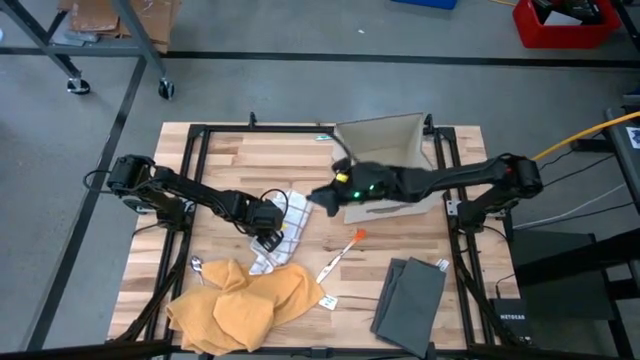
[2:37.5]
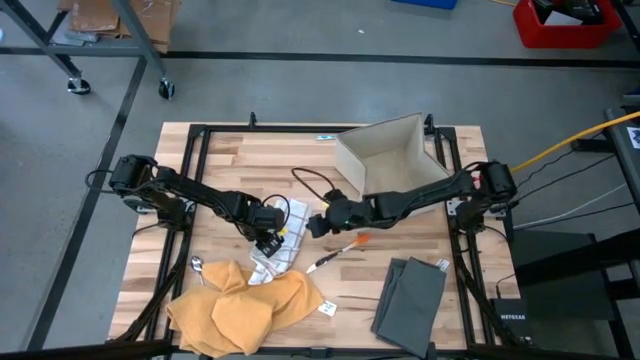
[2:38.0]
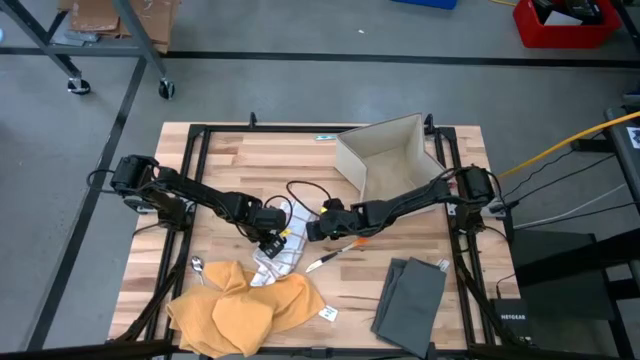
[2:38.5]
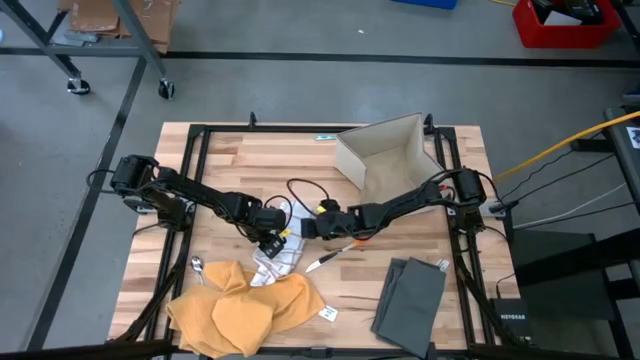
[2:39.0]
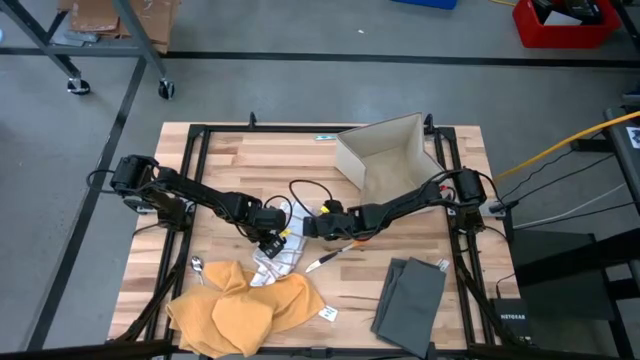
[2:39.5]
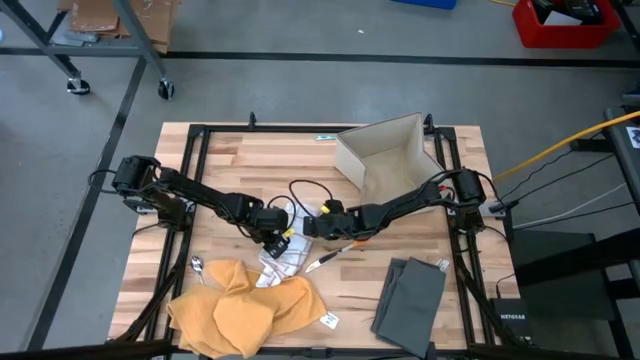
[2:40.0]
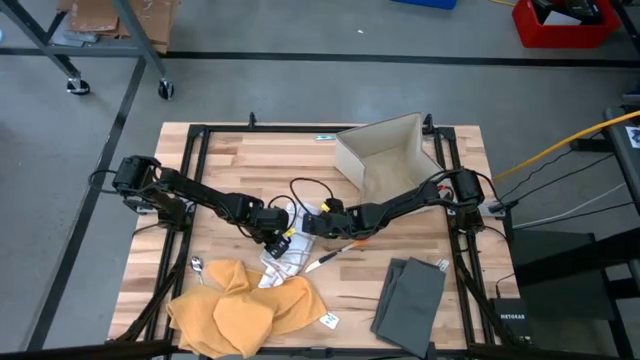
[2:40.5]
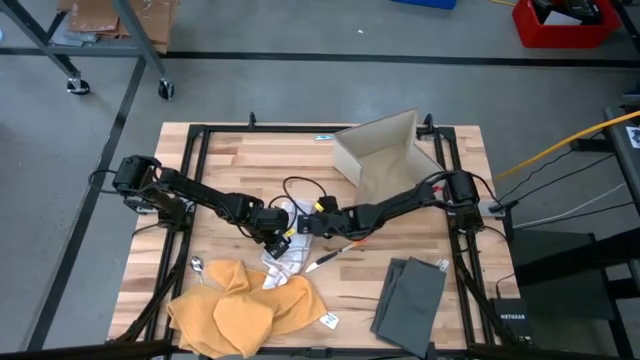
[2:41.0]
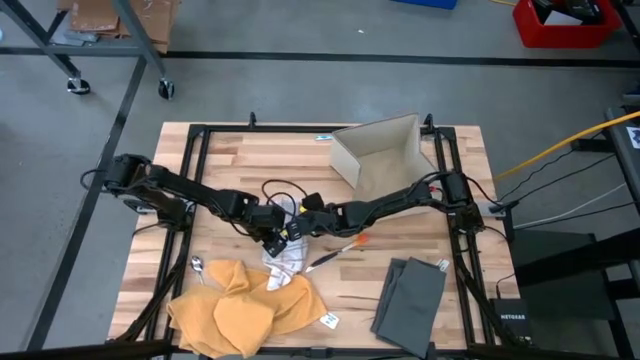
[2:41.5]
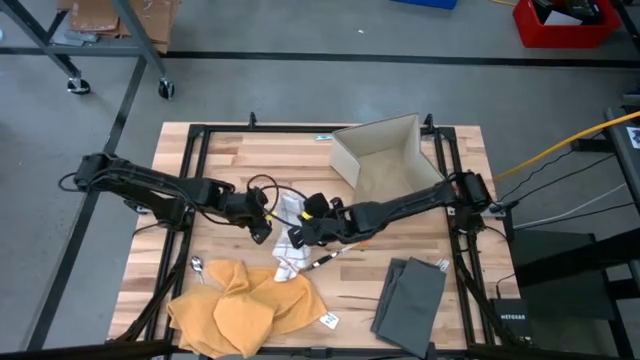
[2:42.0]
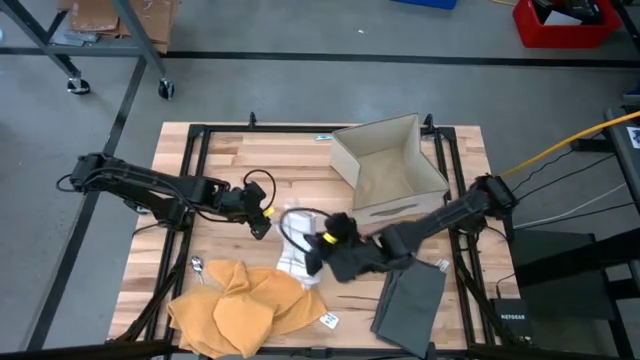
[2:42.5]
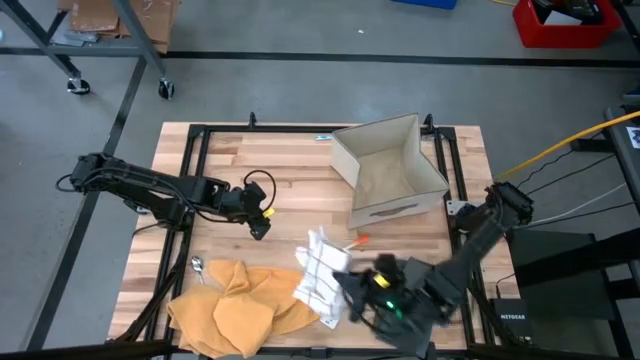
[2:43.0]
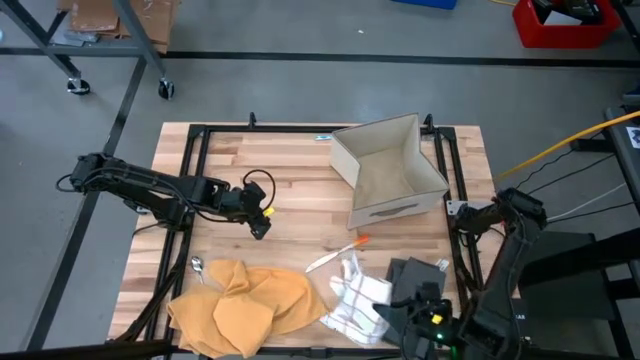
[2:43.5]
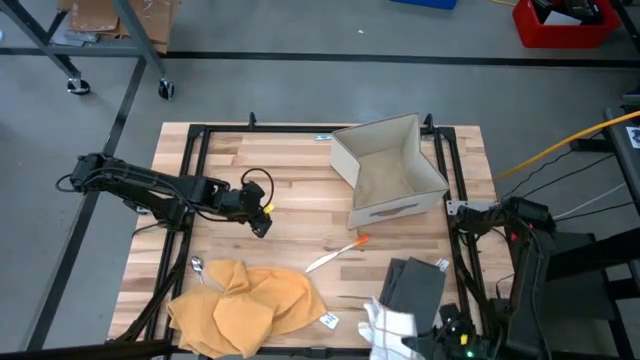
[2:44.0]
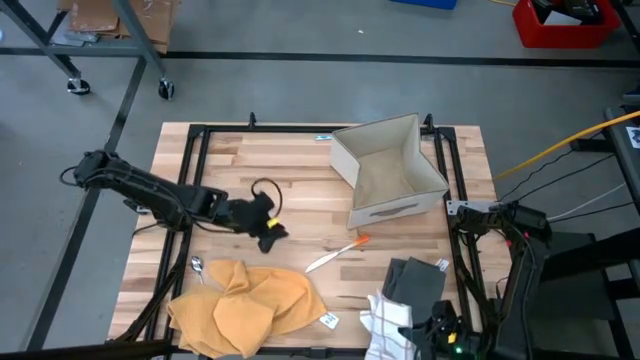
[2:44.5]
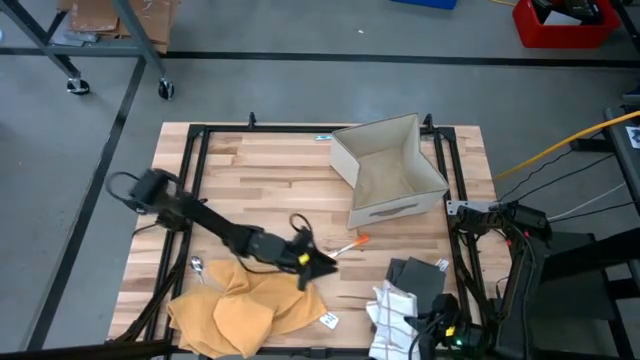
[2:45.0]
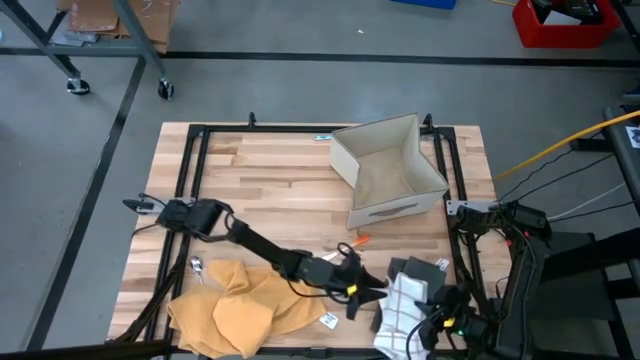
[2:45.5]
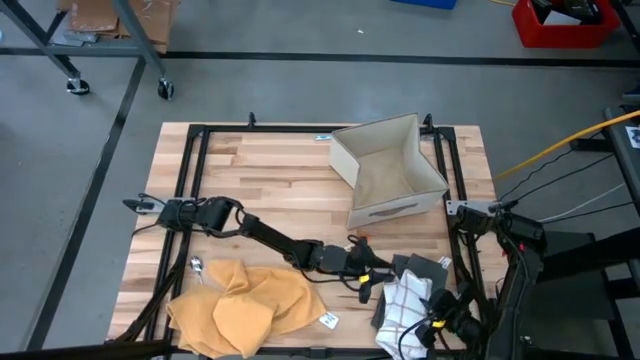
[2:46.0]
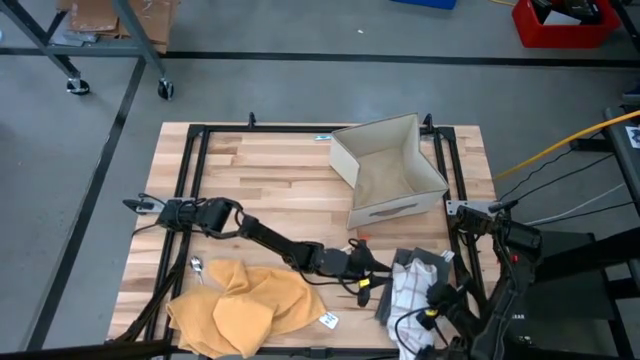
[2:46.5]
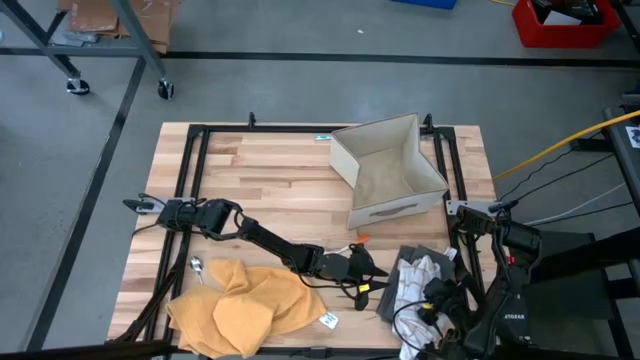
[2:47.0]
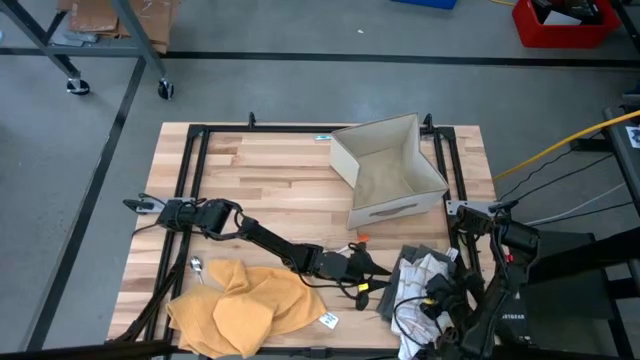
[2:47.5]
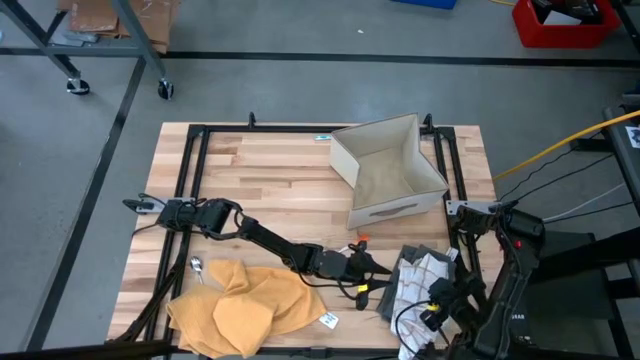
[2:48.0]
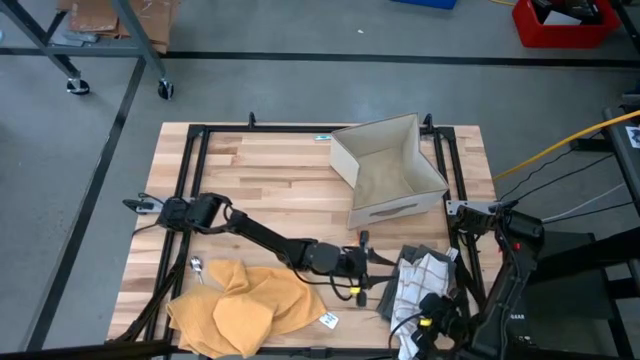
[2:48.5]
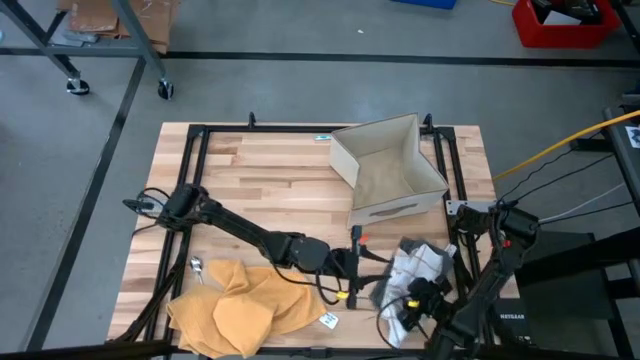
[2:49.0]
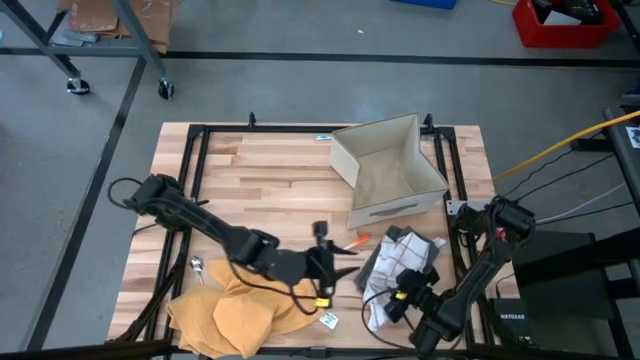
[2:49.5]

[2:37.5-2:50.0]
Task: Fold towel
Stack the white kitchen towel onto the grey kitchen towel

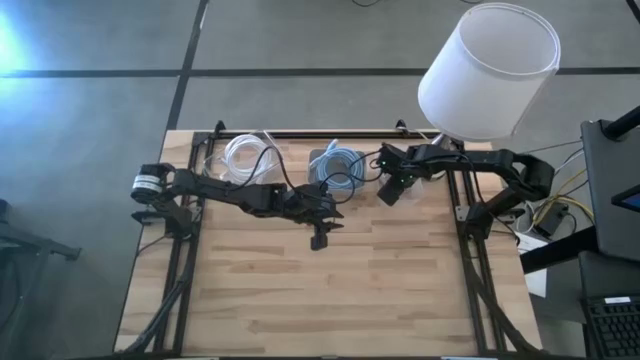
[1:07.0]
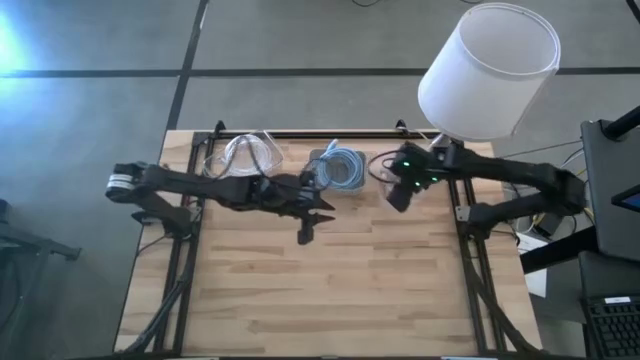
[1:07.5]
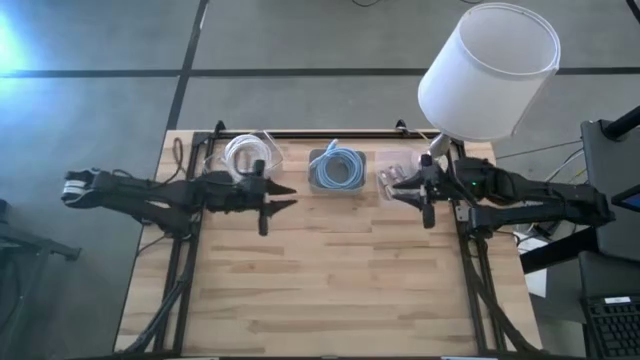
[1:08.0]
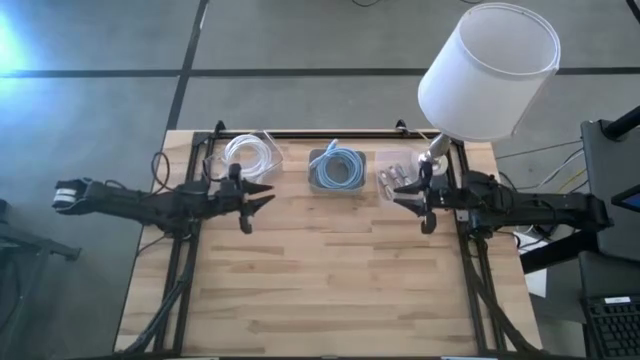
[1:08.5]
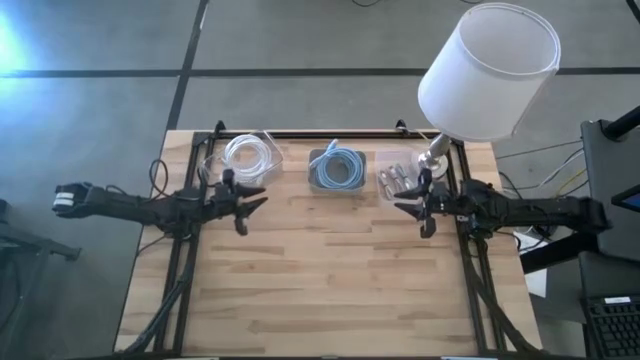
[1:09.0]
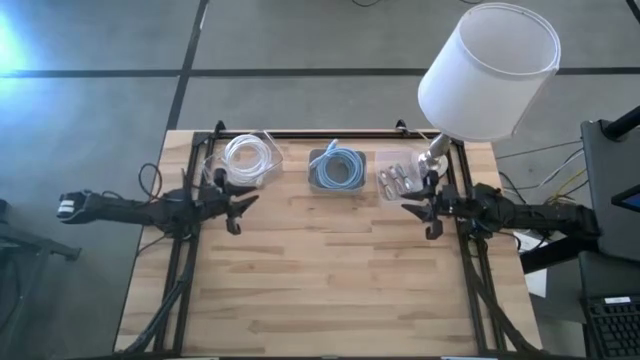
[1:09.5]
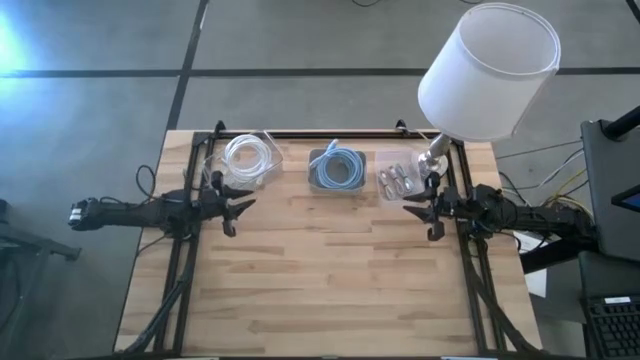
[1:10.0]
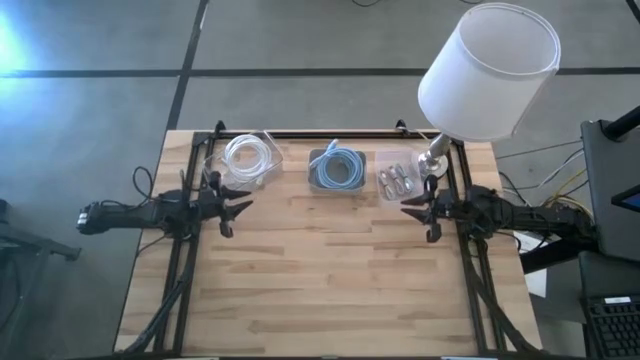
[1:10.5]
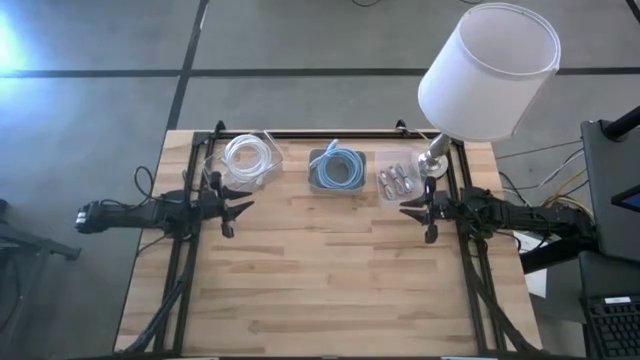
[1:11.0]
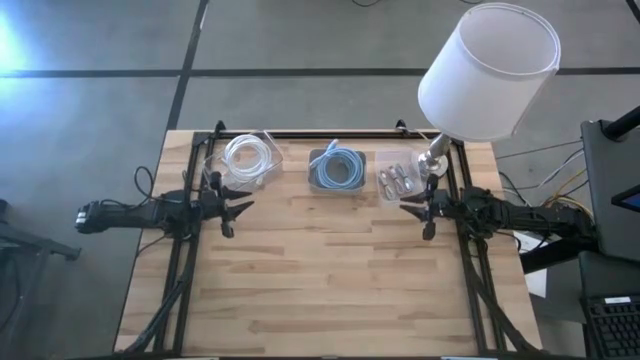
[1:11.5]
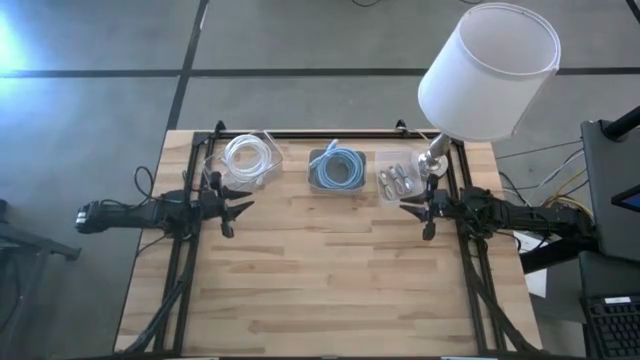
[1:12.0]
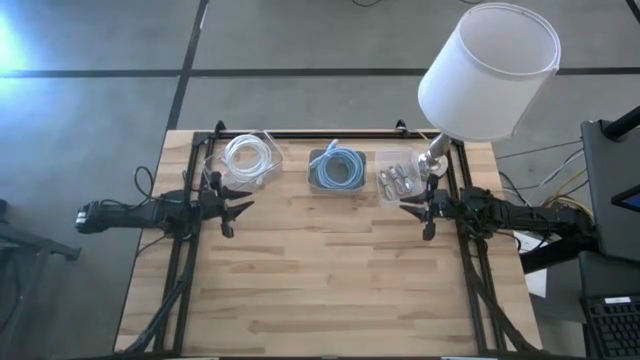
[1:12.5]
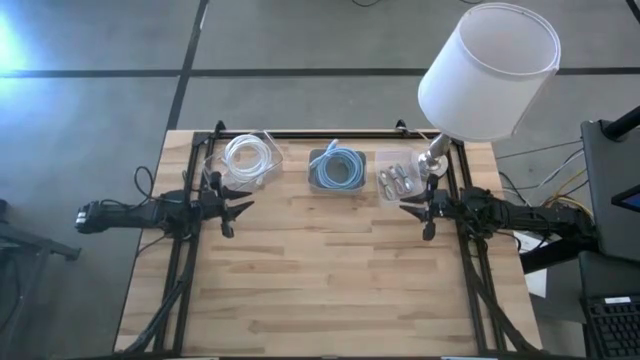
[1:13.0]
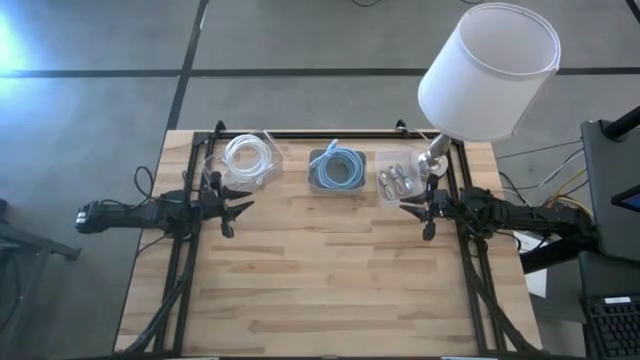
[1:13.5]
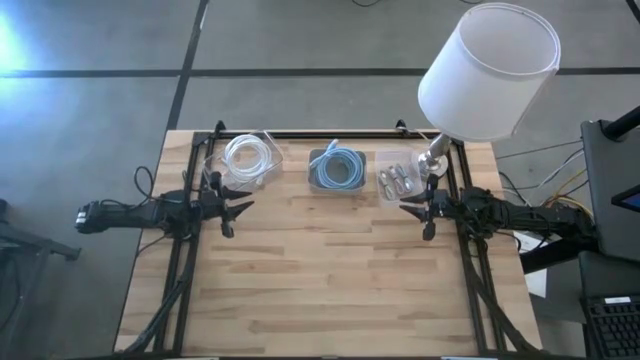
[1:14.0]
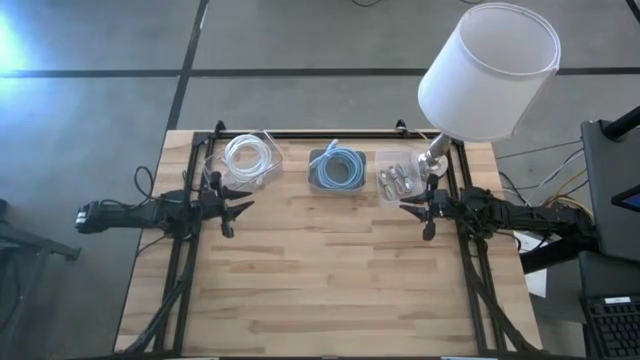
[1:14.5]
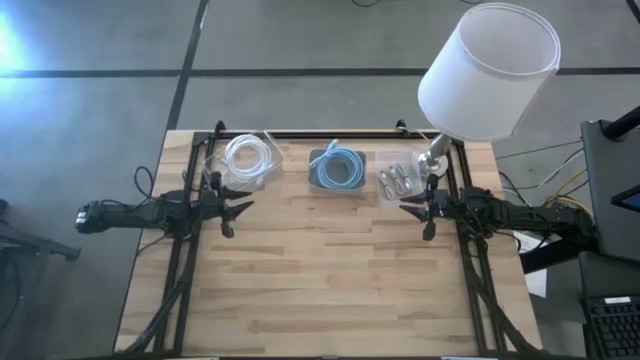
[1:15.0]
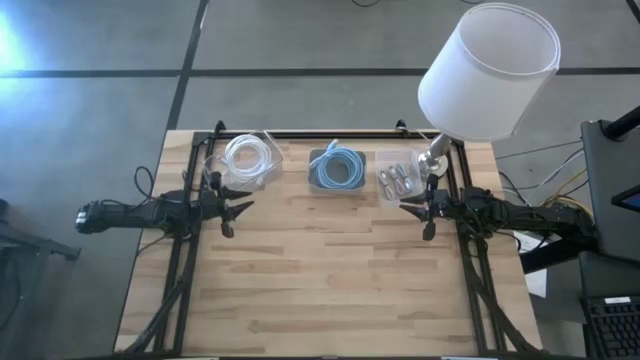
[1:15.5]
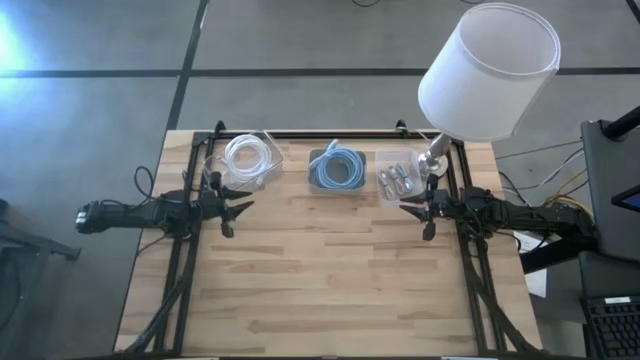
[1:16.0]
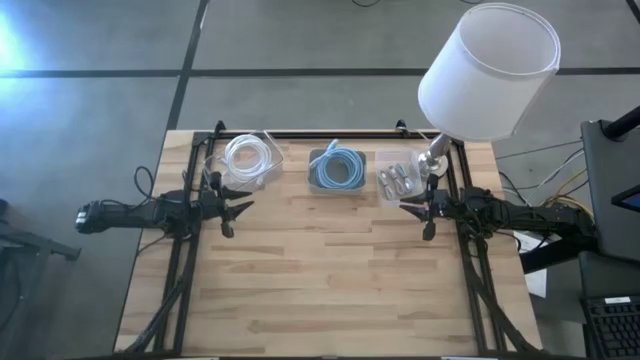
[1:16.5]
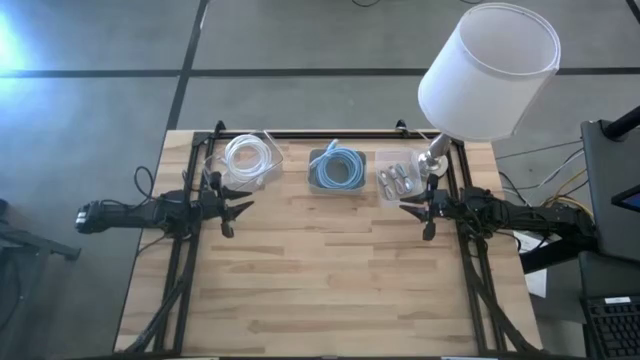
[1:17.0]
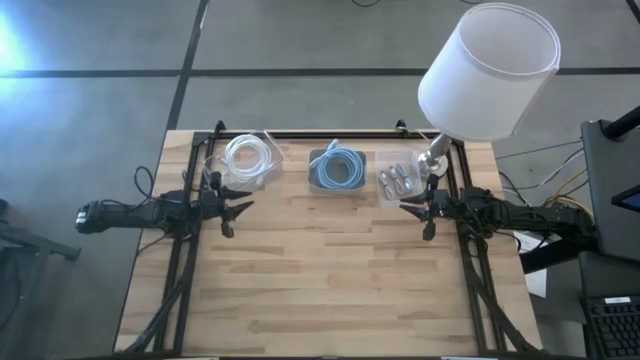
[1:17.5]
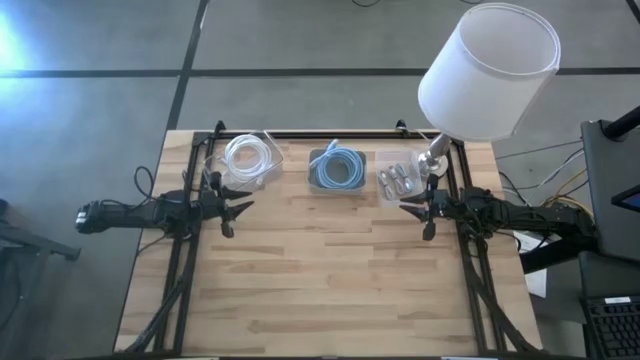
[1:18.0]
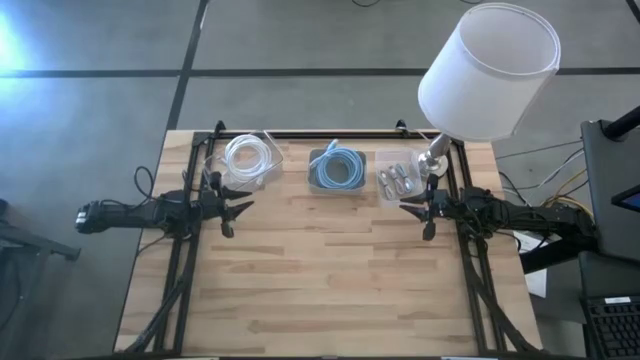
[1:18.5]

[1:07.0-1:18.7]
Task: Pick & Place USB Port
Return to Home Position
